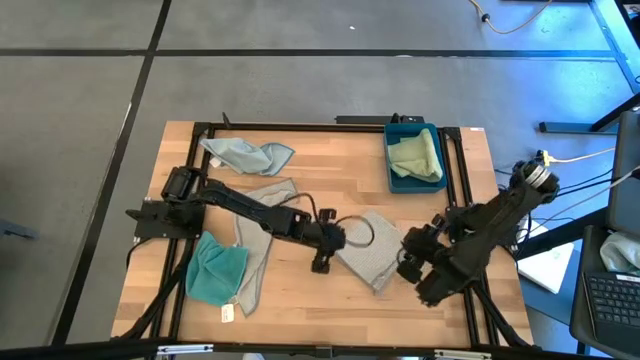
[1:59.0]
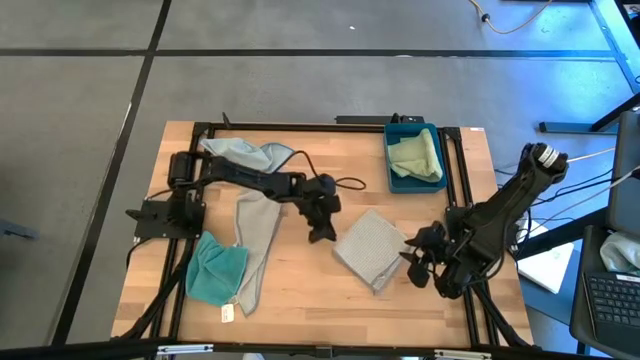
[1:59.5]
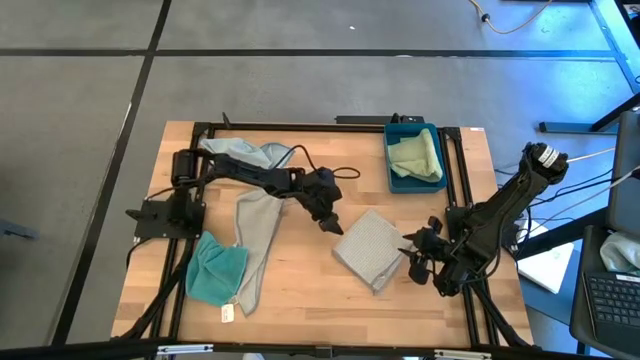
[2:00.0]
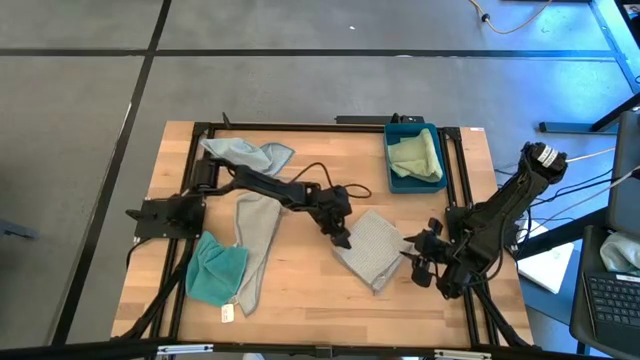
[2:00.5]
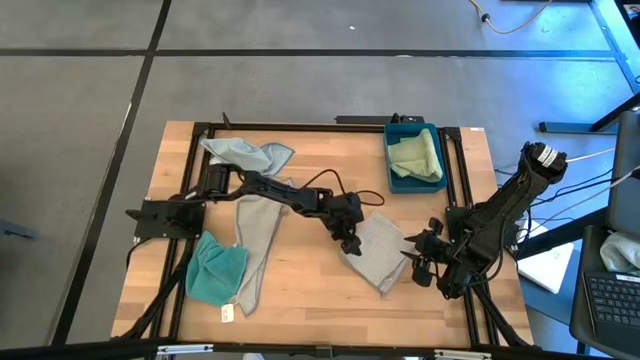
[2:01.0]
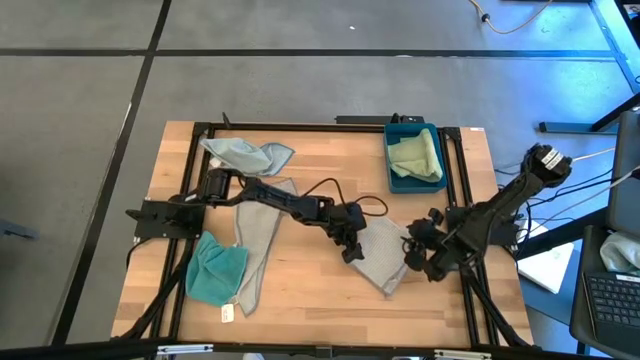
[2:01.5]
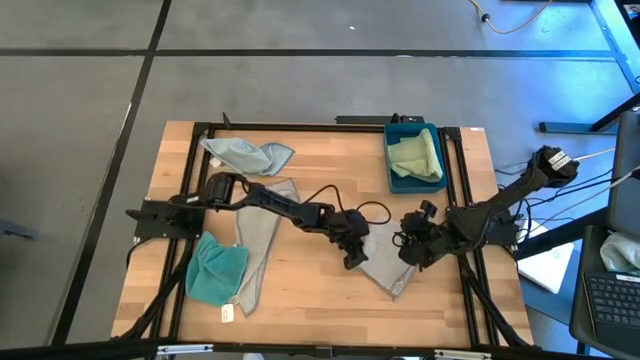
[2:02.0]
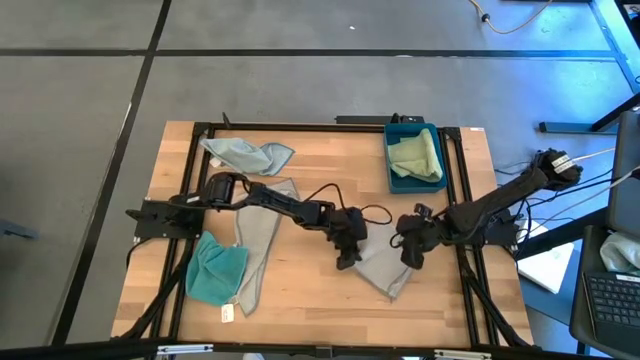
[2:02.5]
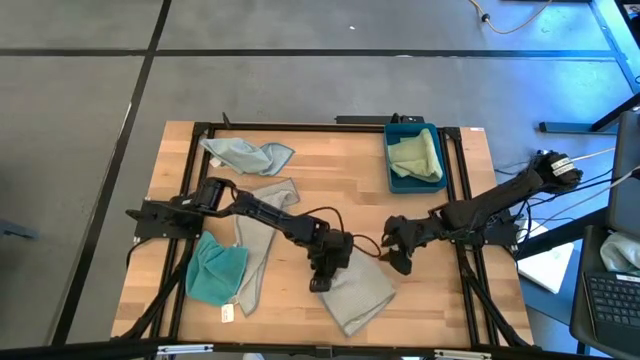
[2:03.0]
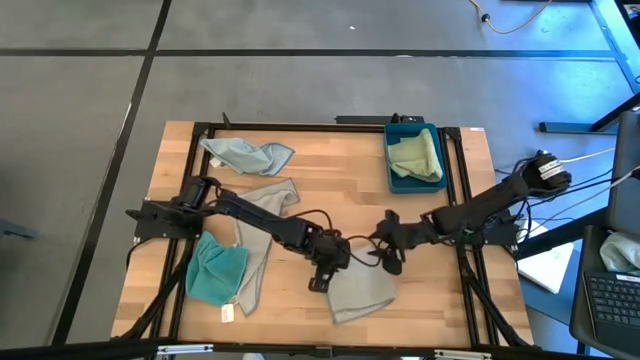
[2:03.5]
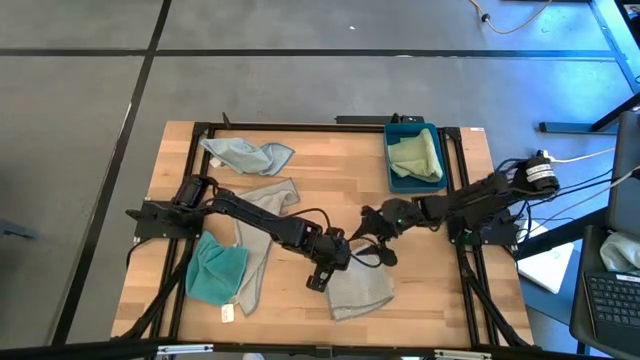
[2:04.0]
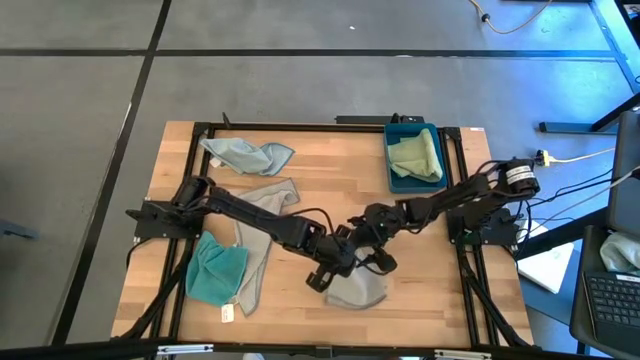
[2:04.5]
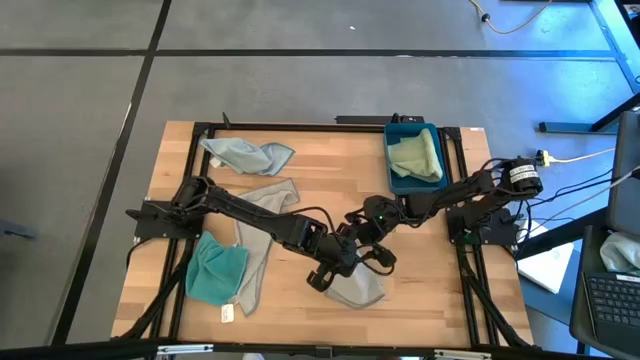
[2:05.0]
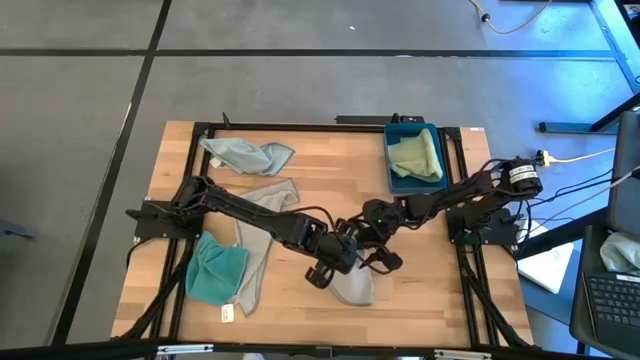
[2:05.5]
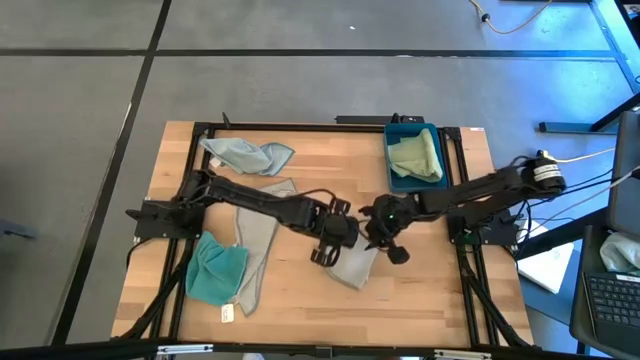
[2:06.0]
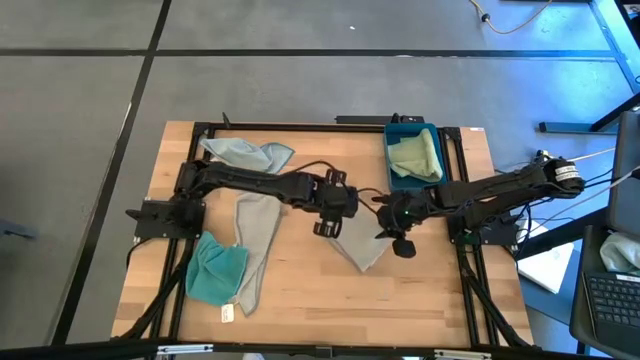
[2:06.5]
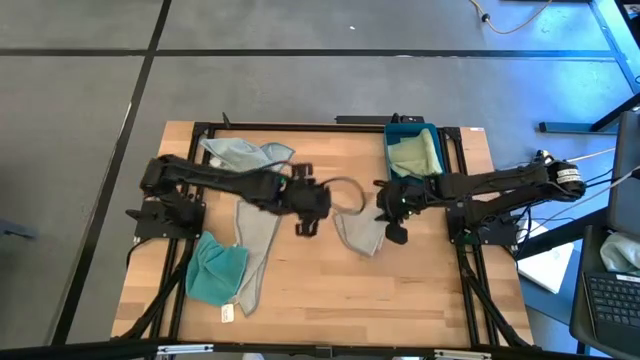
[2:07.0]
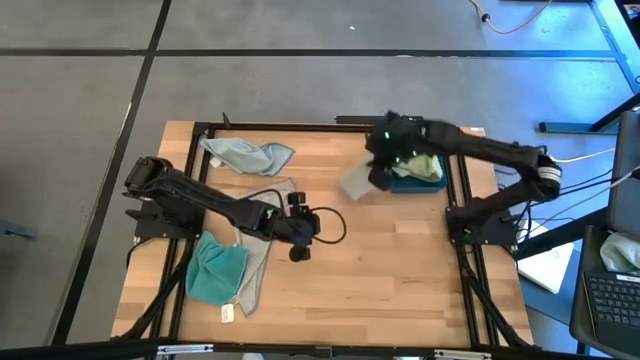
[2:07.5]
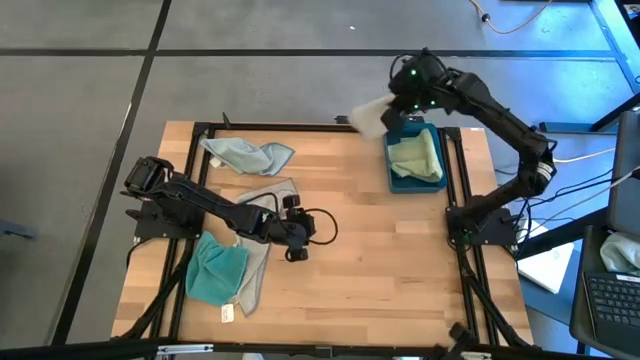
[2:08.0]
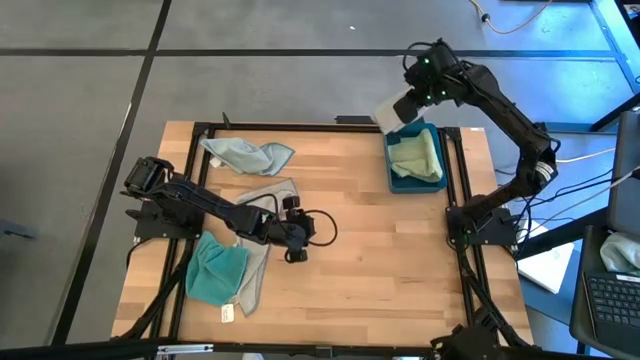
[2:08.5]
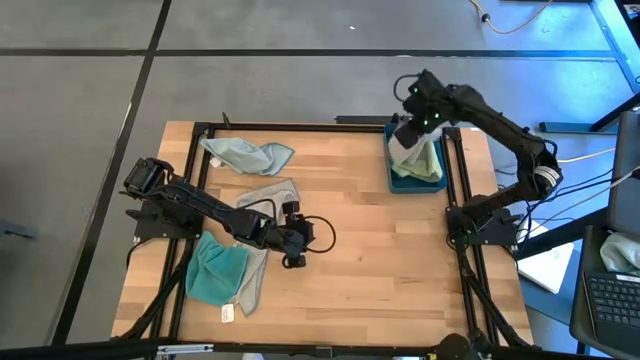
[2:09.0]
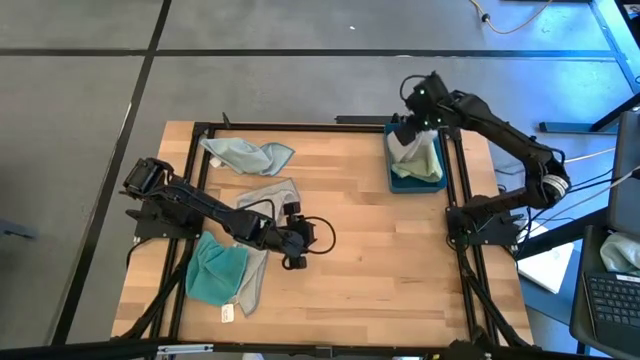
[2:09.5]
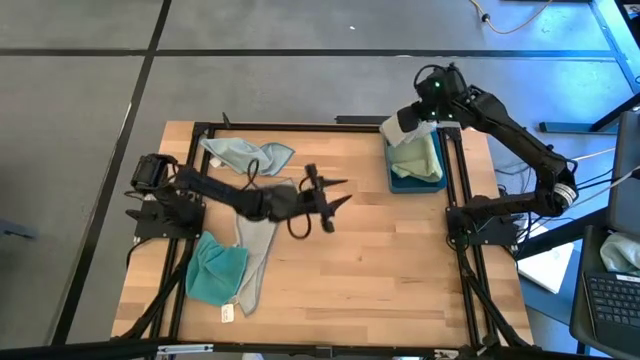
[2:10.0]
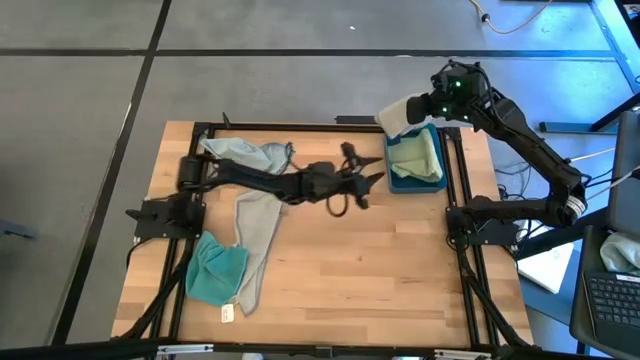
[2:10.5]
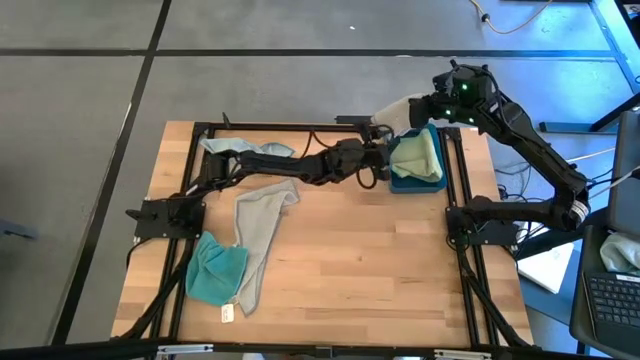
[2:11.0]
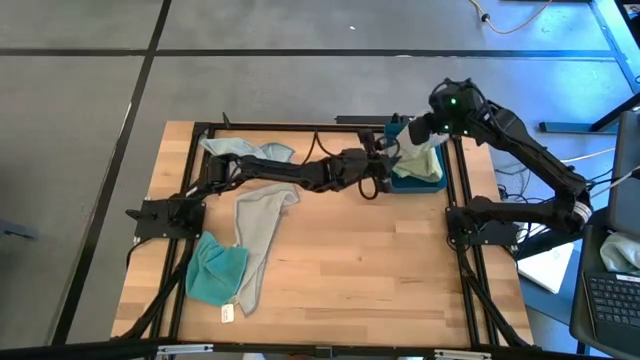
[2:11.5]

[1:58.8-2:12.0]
Task: Fold microfiber towels
Put the top grey microfiber cloth into the blue bin

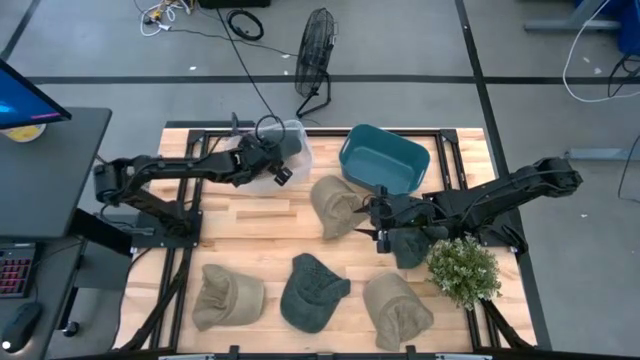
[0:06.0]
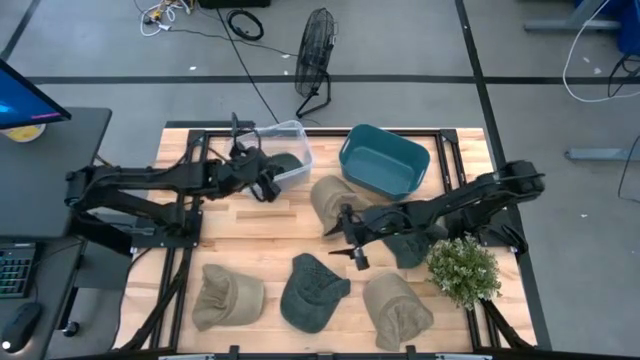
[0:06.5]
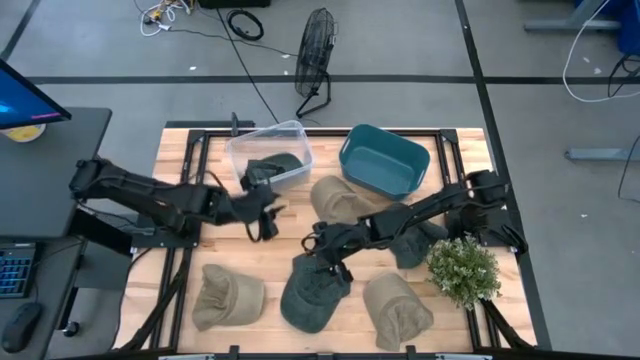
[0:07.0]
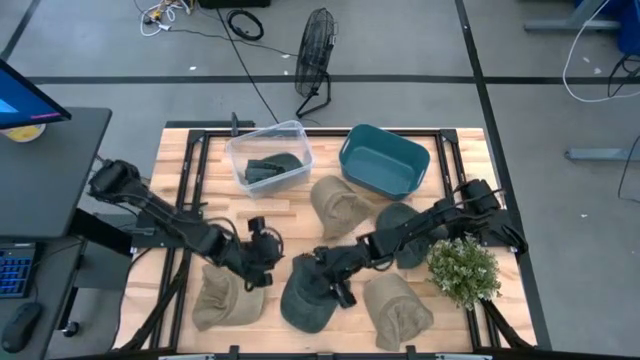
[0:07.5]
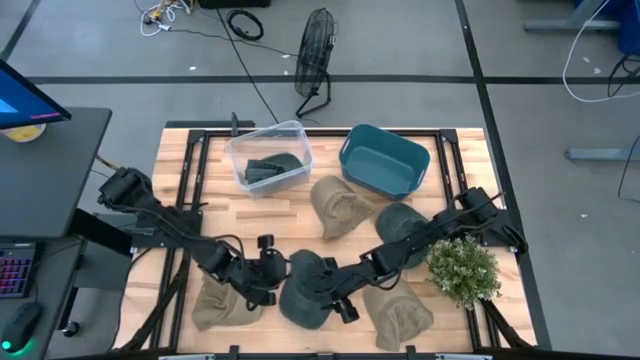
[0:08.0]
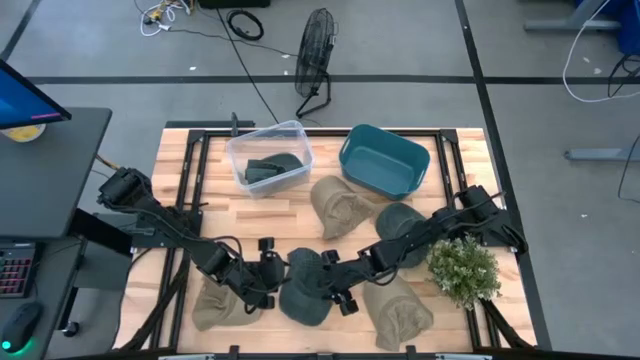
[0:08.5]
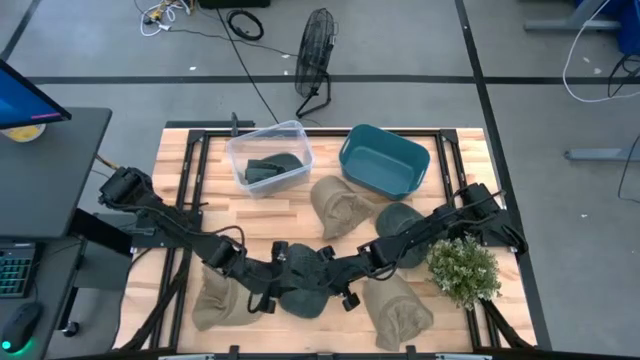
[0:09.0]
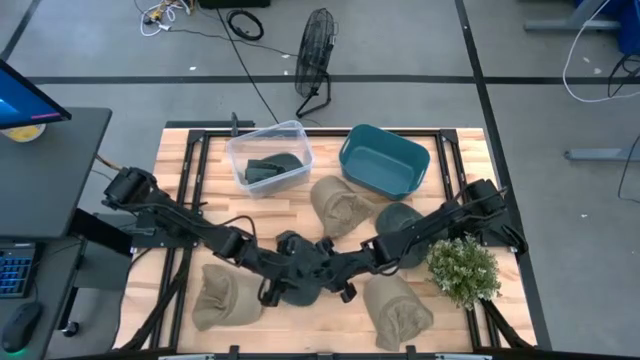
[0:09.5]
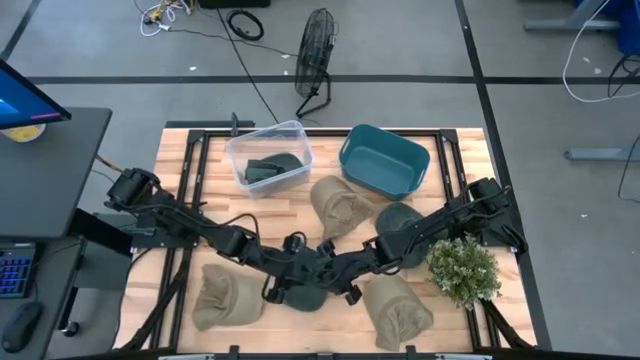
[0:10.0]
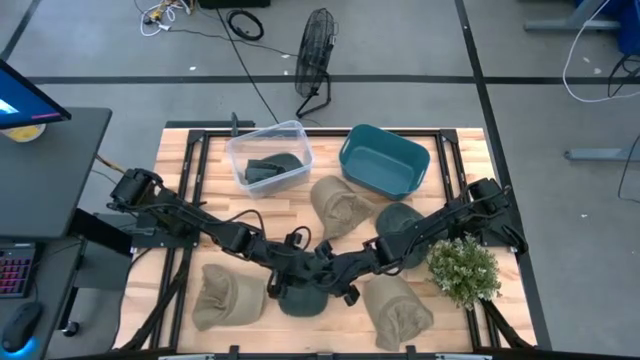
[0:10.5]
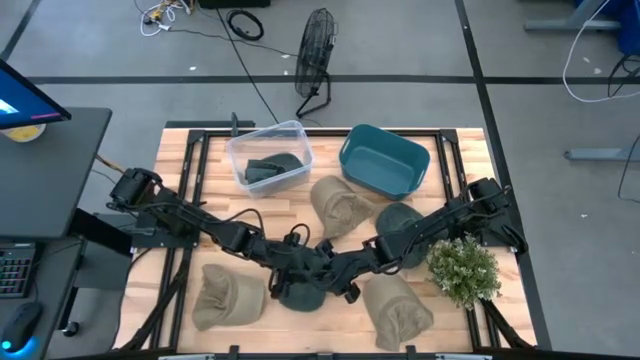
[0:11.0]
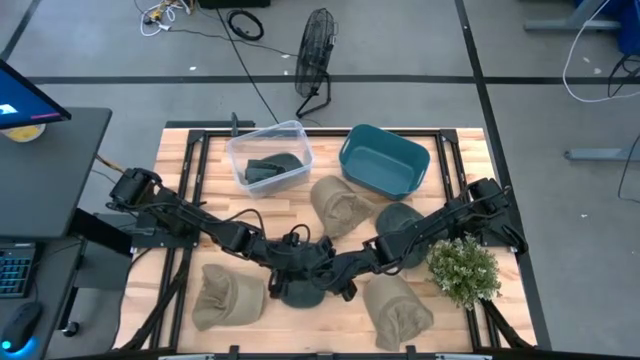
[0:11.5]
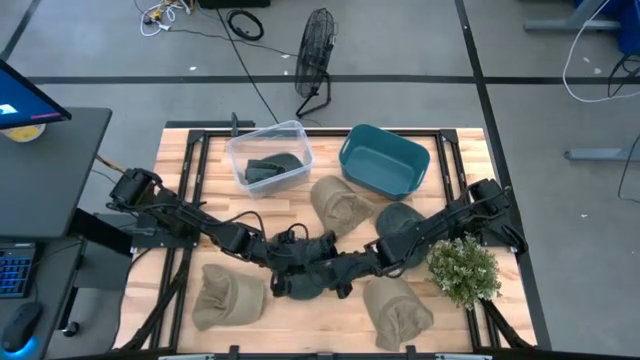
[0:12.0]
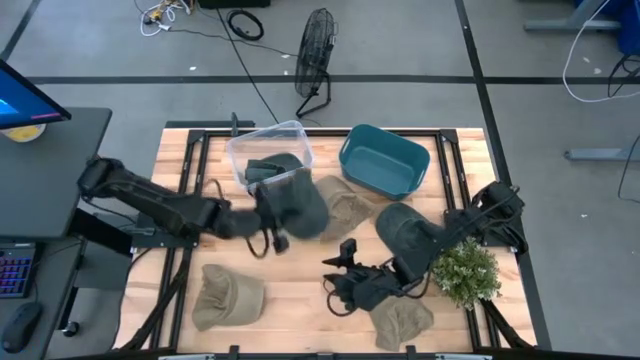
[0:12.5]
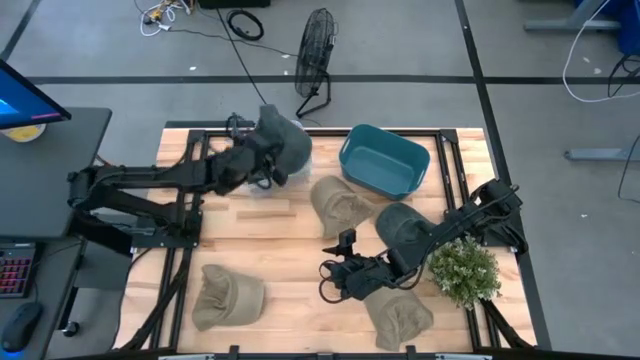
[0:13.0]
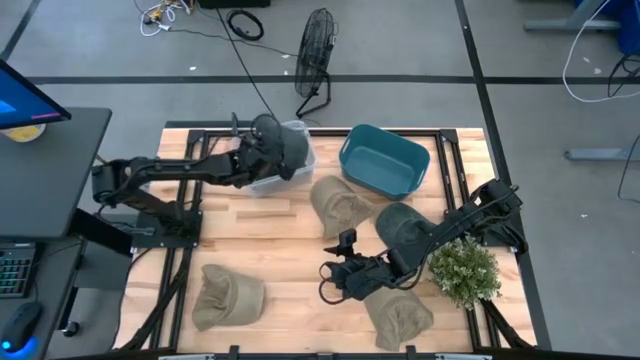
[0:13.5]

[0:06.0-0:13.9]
Task: Pick & Place hat
Put the bottom blue cap into the transparent bin
